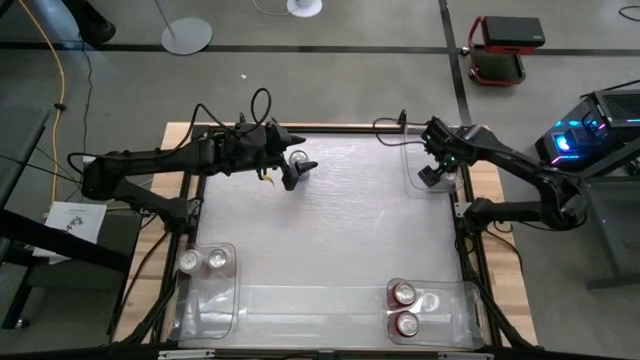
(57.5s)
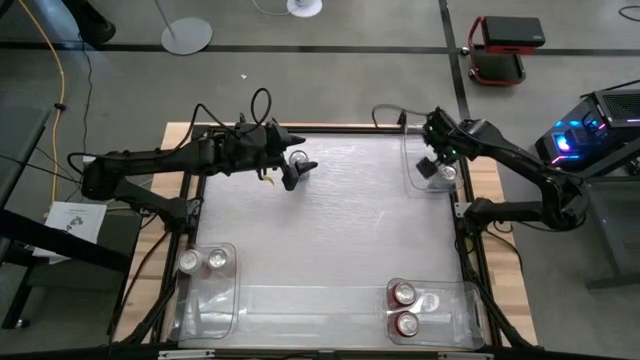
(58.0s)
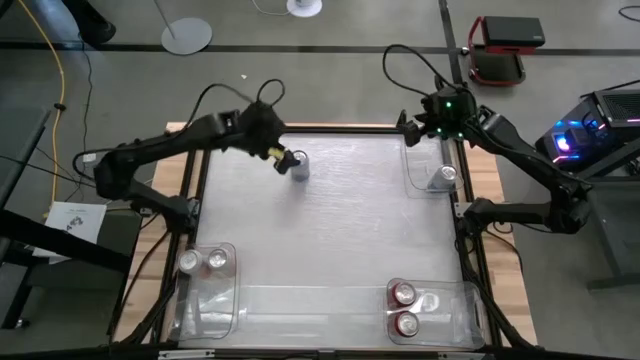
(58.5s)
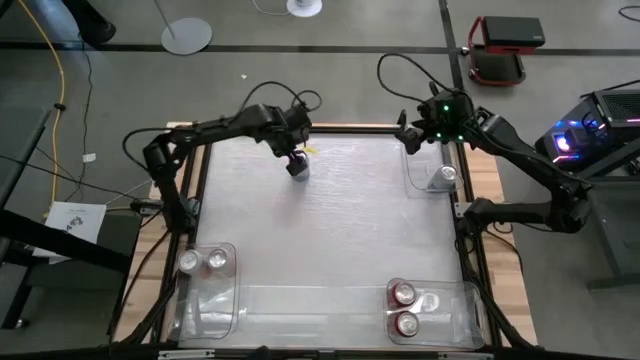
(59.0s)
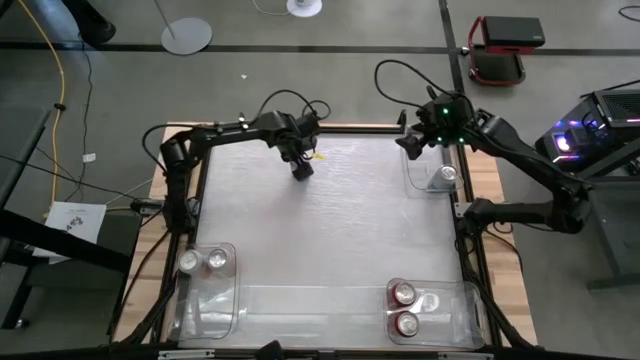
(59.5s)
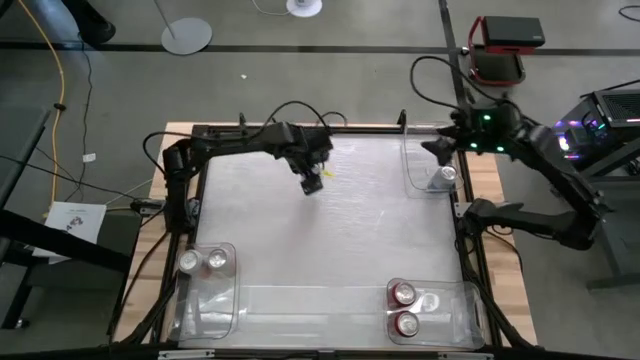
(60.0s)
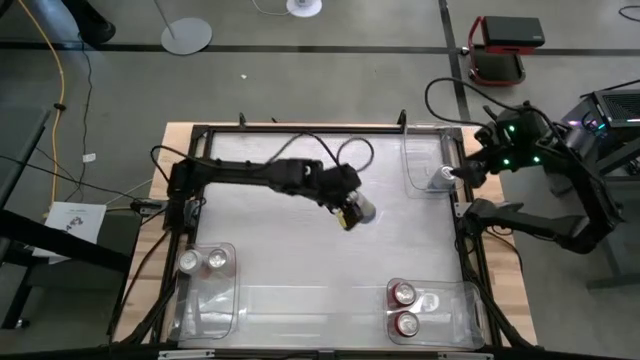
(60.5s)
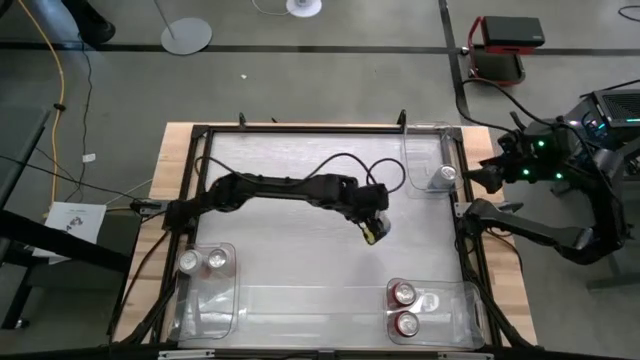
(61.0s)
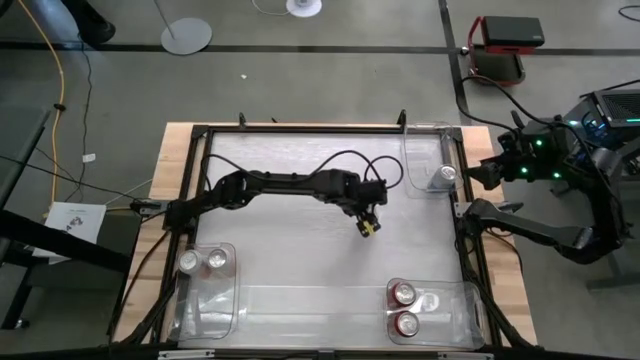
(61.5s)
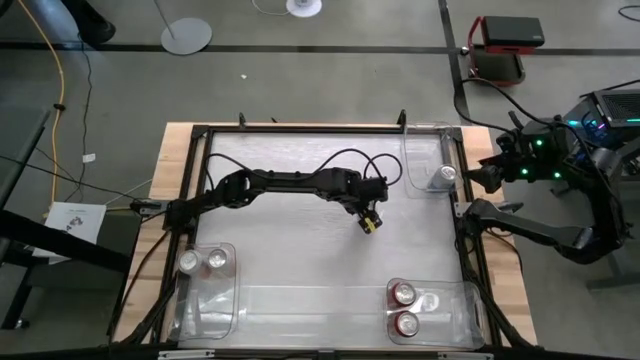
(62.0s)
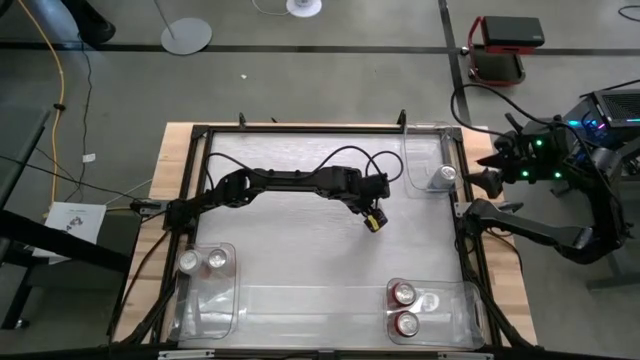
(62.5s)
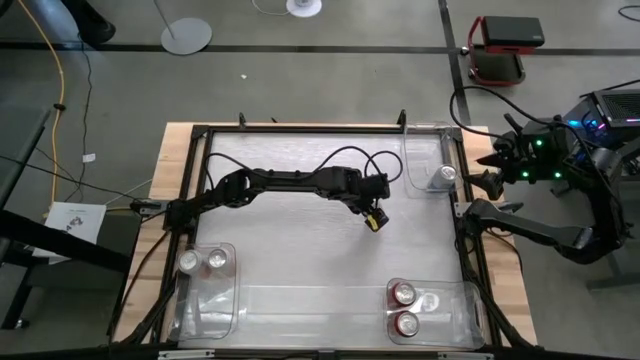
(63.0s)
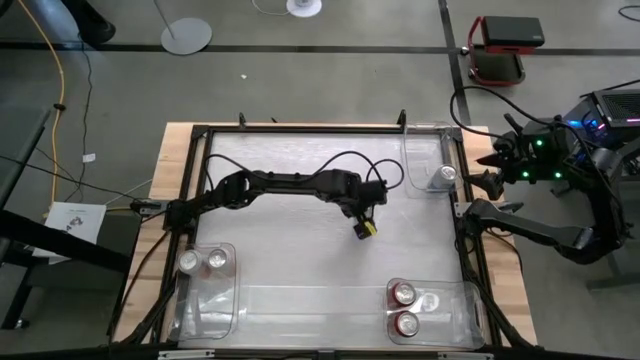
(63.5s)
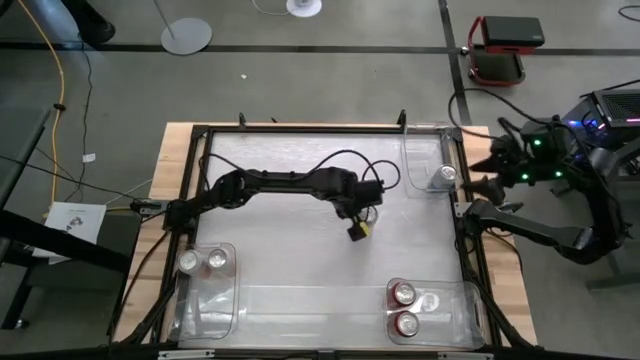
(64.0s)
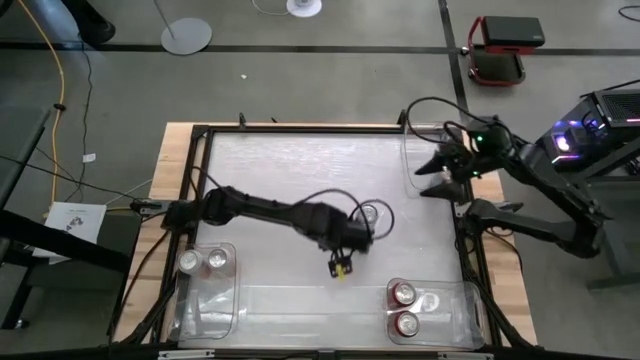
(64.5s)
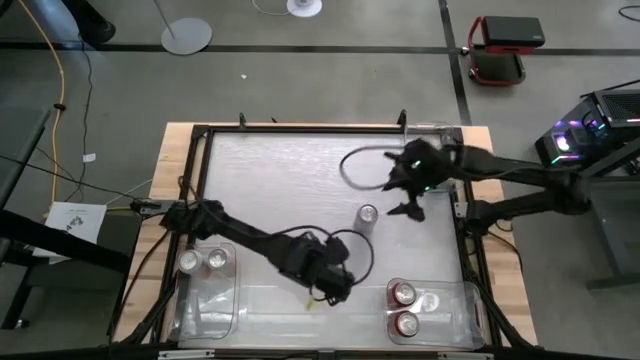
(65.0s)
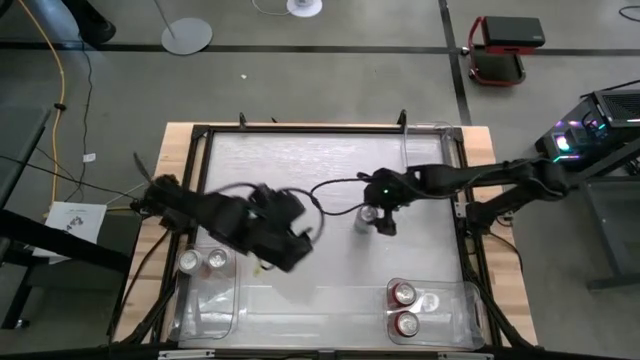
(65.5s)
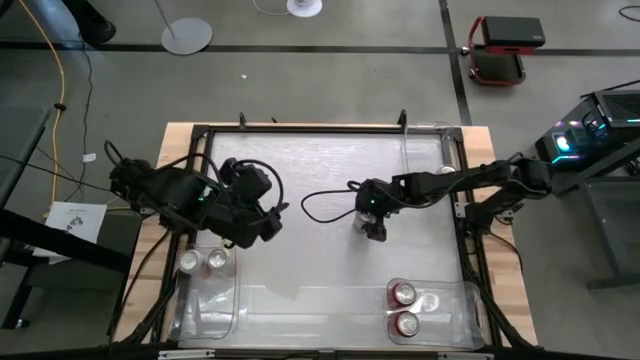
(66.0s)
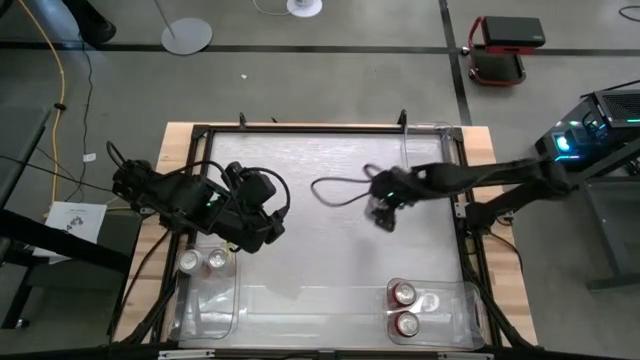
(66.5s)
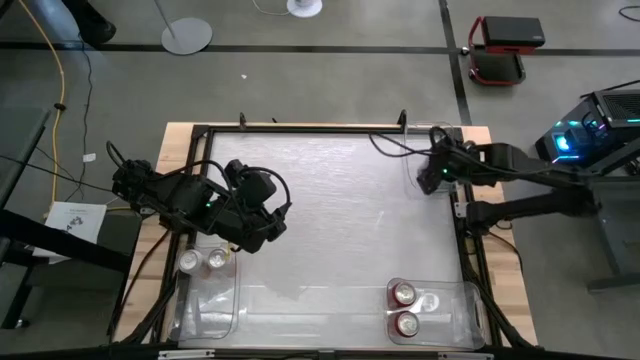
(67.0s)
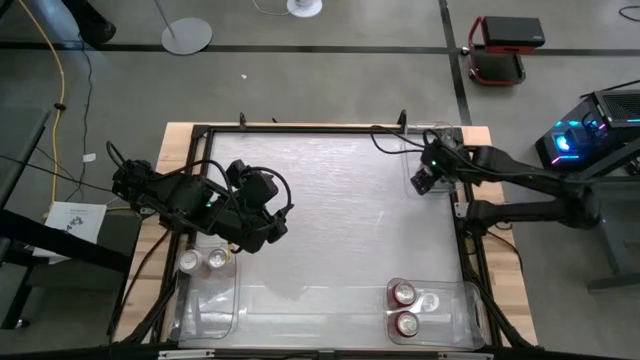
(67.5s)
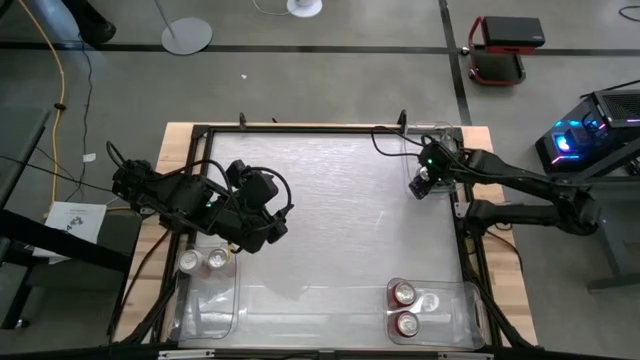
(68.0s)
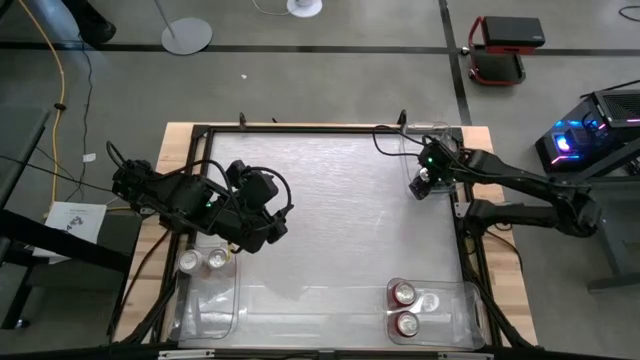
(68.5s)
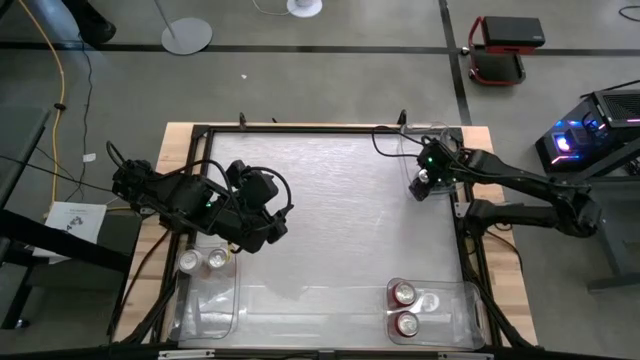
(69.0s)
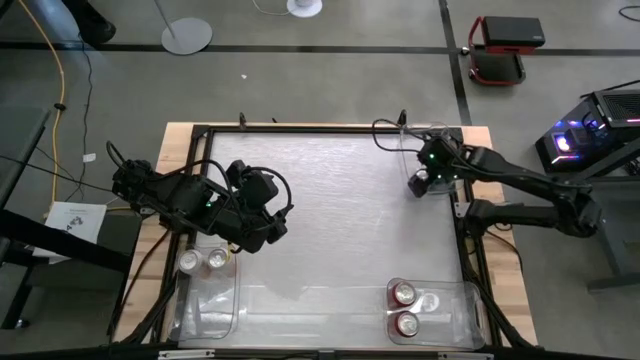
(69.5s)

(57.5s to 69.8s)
Task: Sort soda cans
Put the blue-white soda can into the top transparent bin

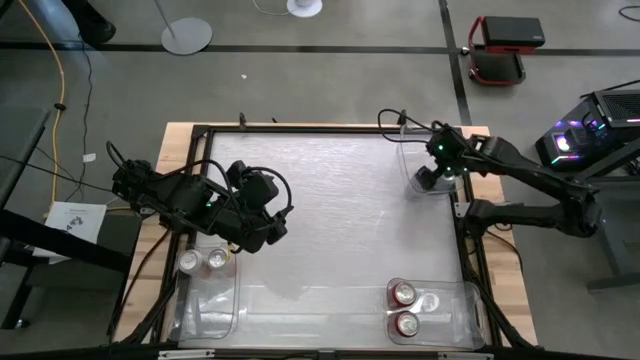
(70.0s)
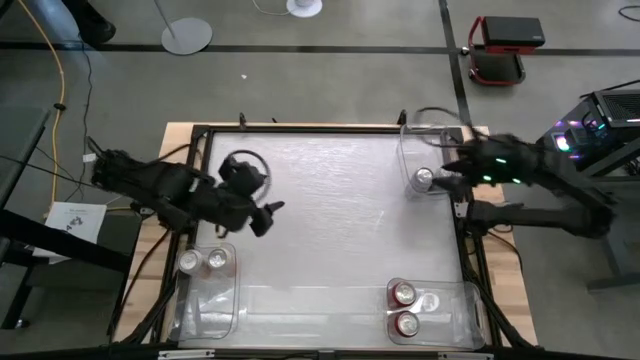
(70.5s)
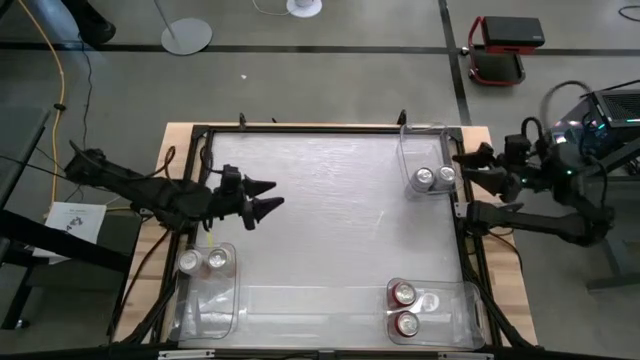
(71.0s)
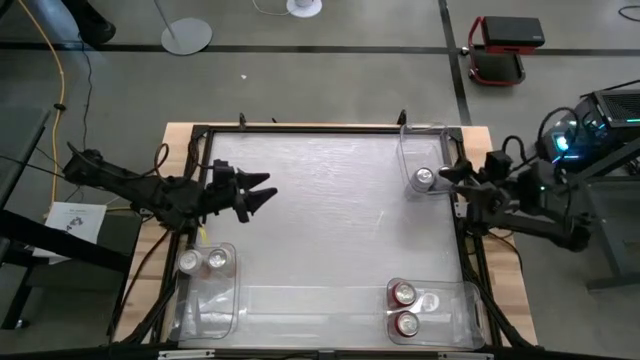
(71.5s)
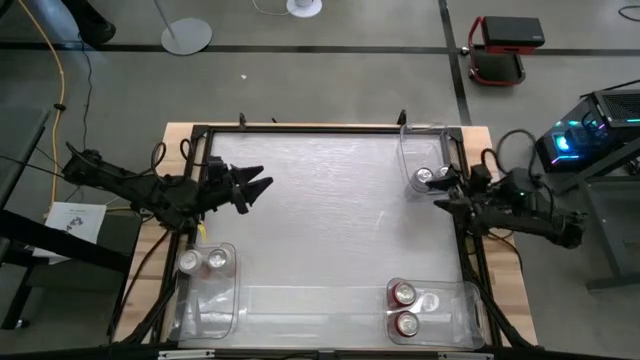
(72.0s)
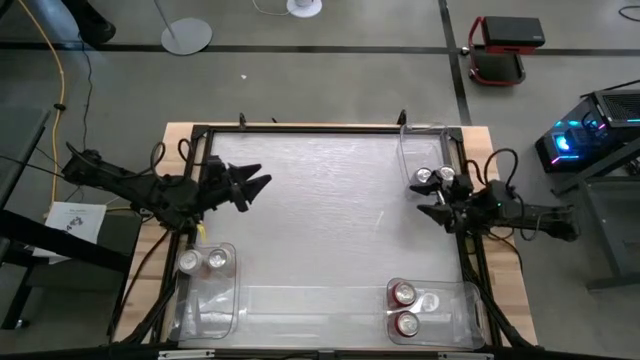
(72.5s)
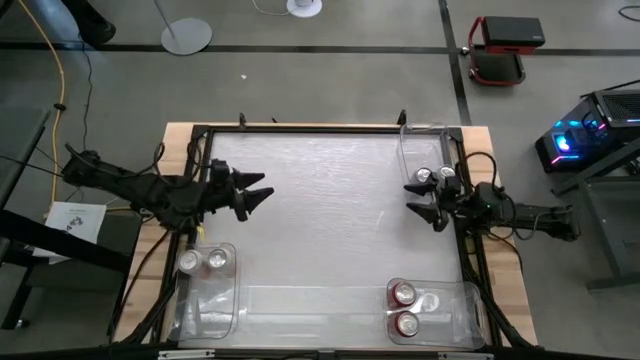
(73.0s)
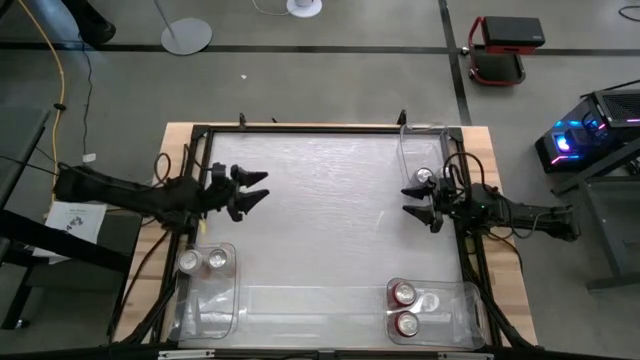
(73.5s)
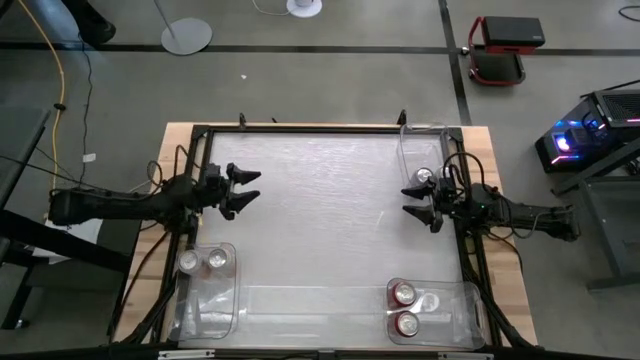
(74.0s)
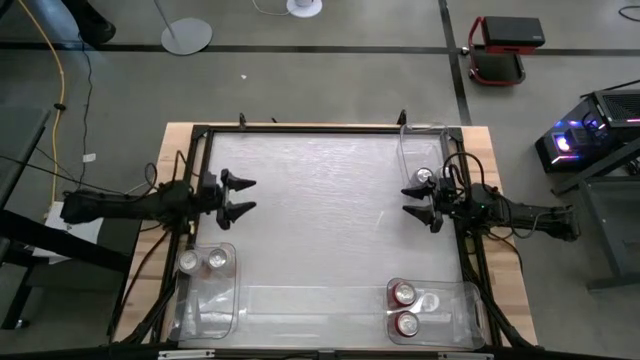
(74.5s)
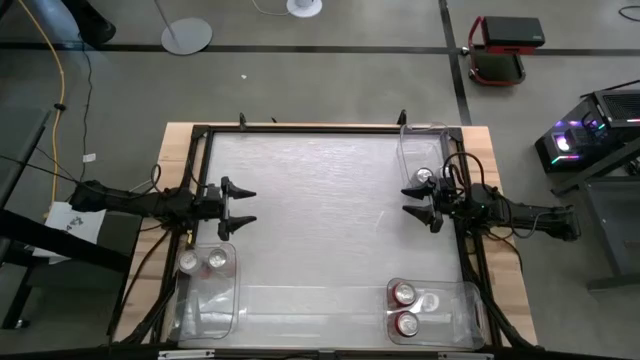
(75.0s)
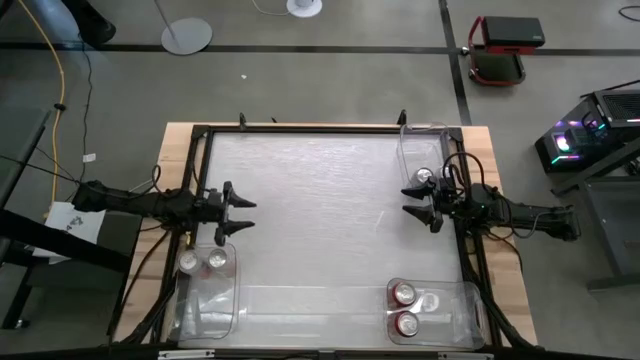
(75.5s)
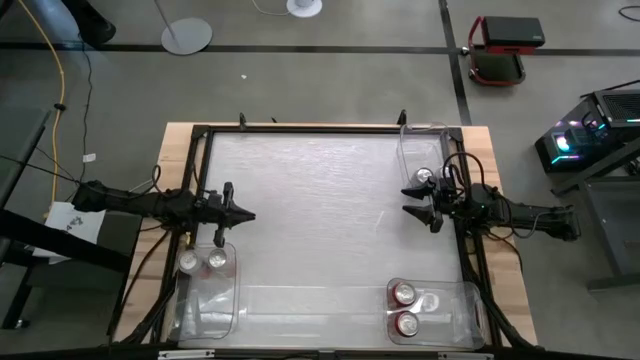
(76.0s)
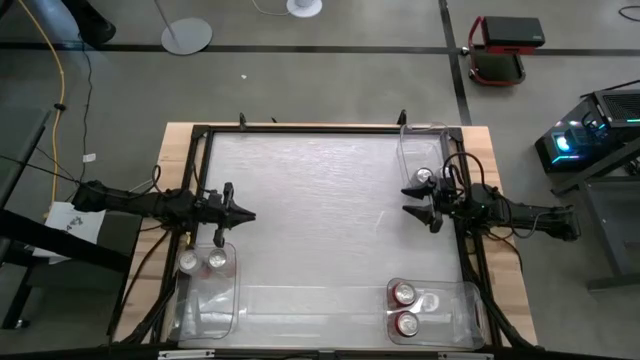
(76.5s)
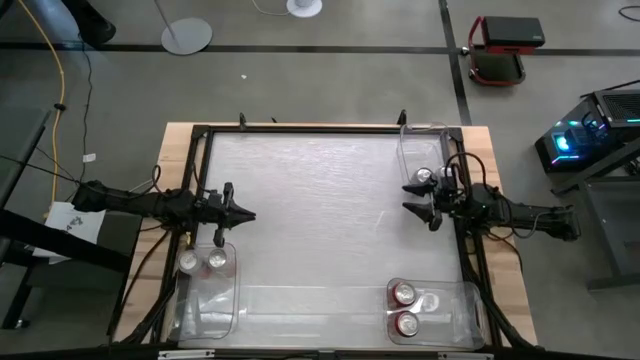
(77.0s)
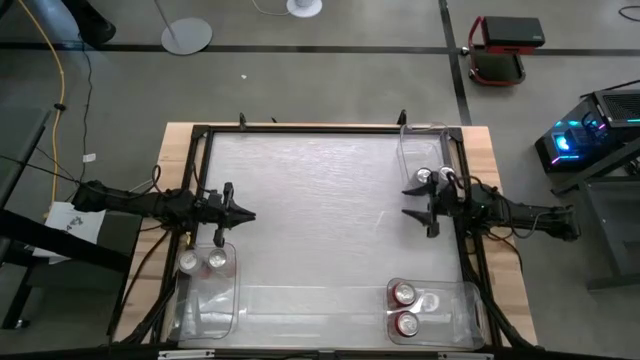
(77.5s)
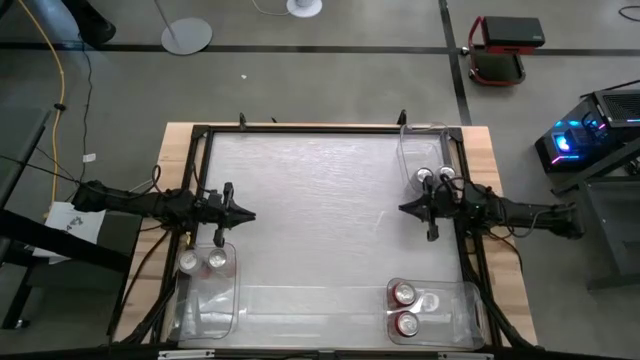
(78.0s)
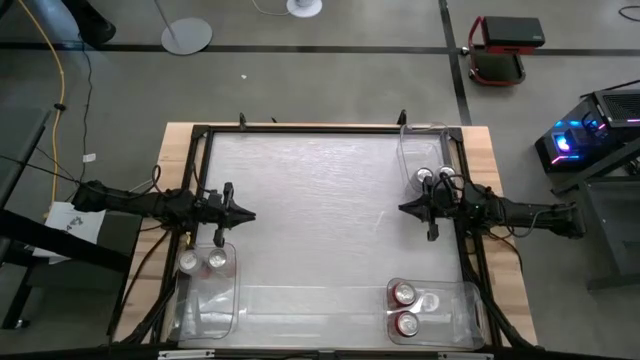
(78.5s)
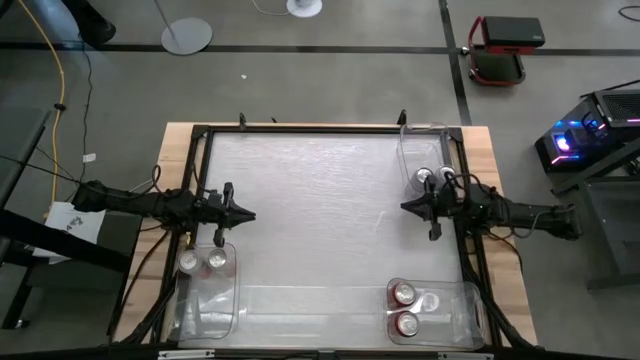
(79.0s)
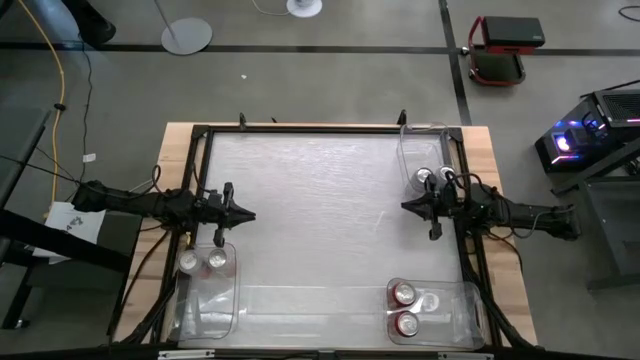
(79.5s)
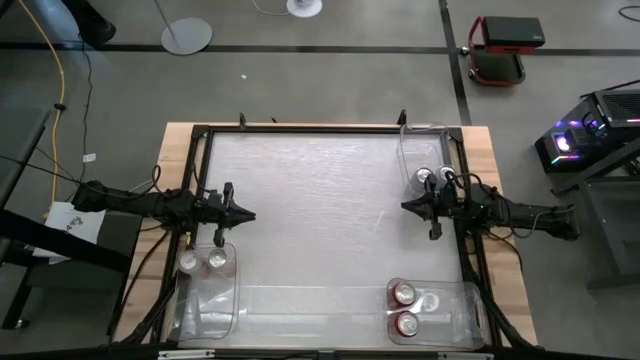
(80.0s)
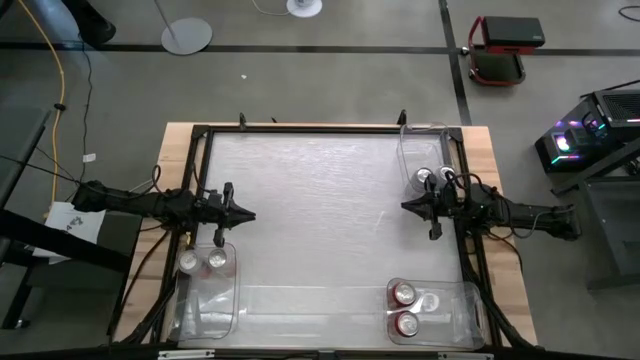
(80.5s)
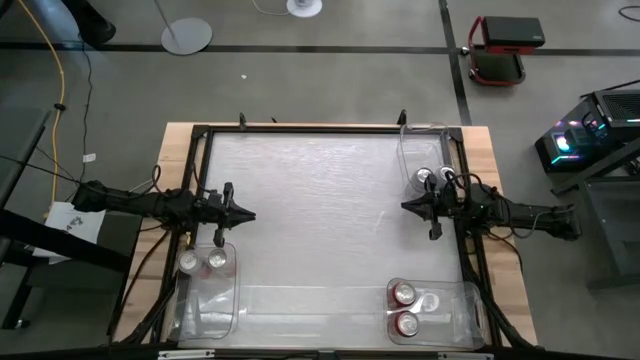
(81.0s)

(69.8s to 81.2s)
Return to Home Position
